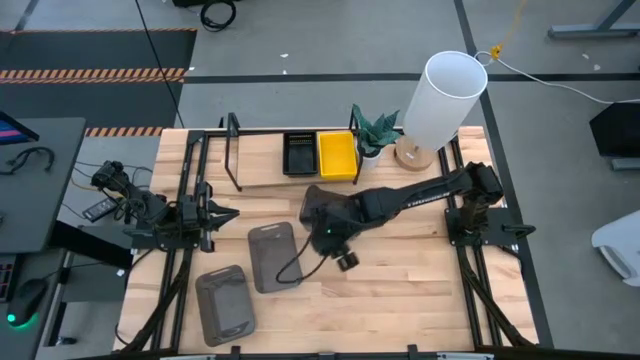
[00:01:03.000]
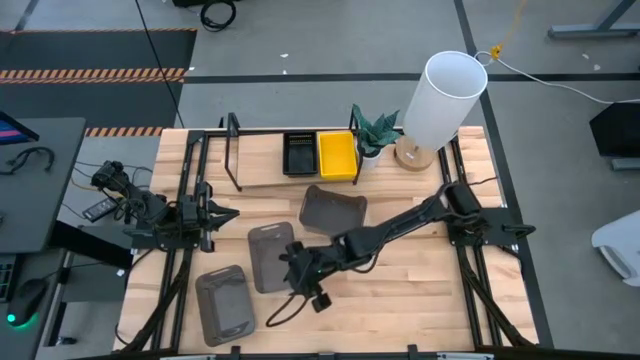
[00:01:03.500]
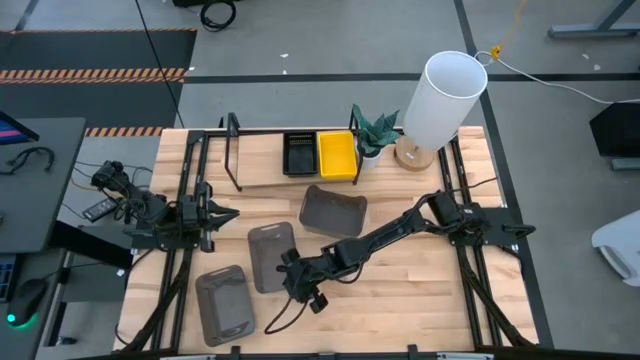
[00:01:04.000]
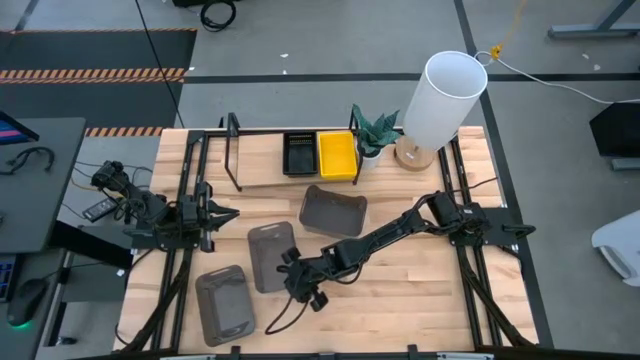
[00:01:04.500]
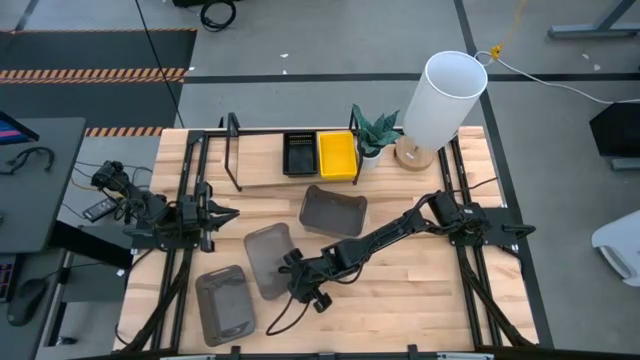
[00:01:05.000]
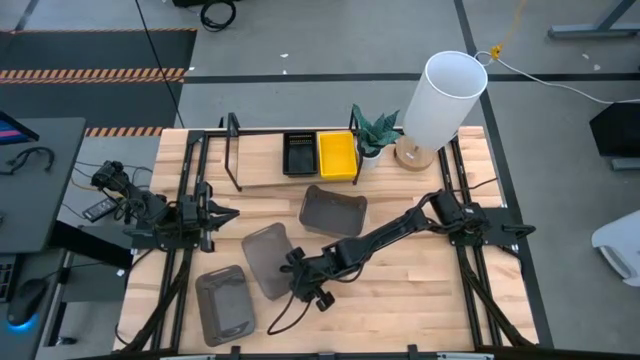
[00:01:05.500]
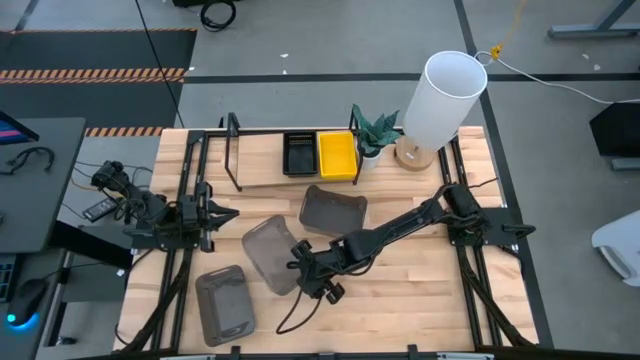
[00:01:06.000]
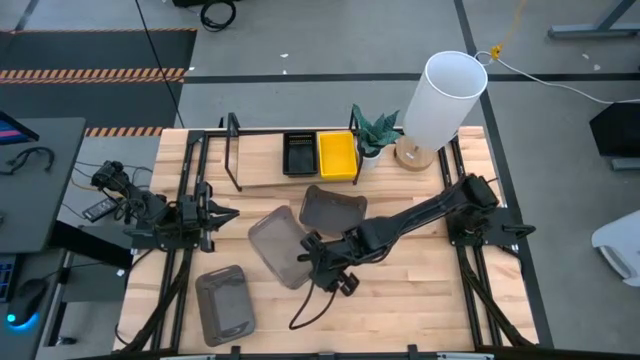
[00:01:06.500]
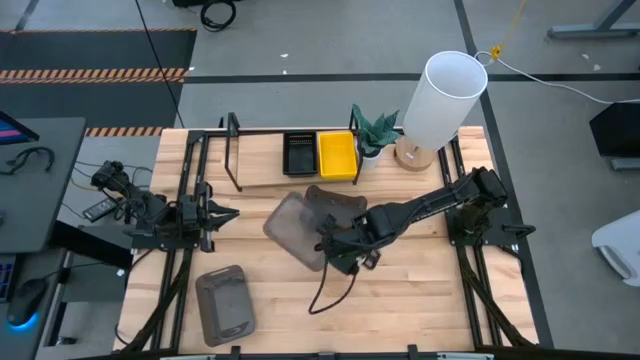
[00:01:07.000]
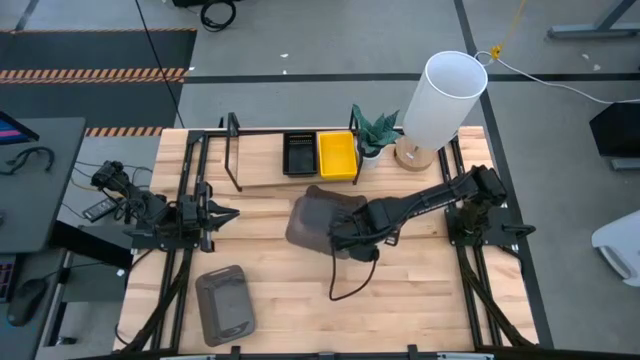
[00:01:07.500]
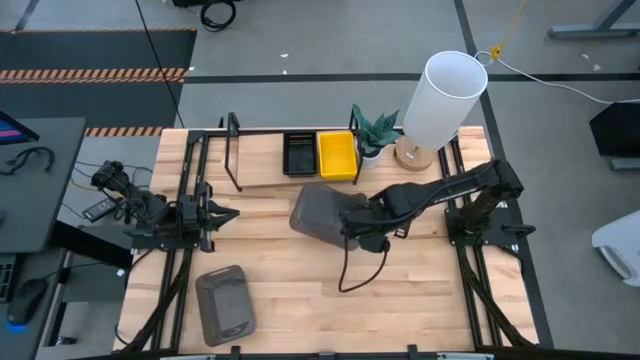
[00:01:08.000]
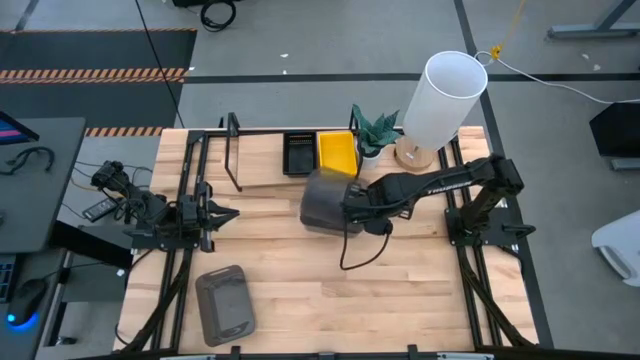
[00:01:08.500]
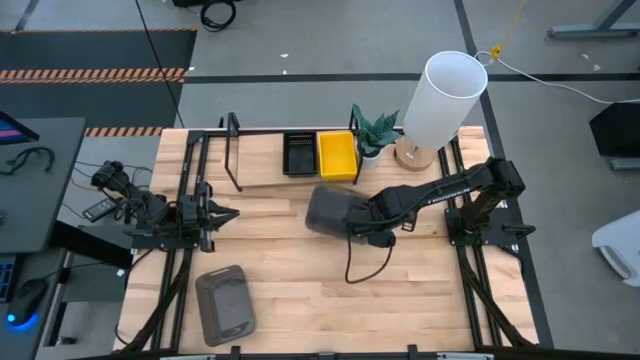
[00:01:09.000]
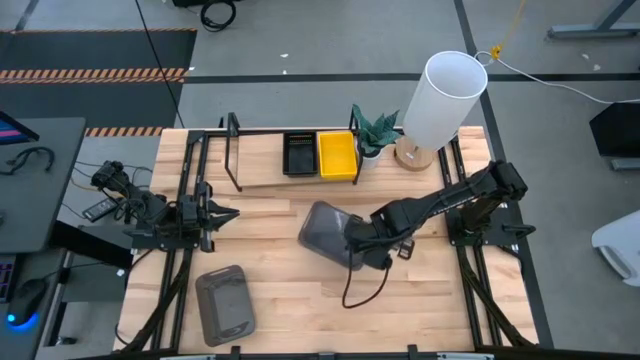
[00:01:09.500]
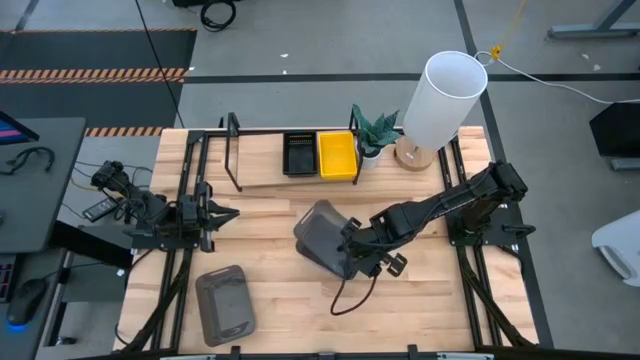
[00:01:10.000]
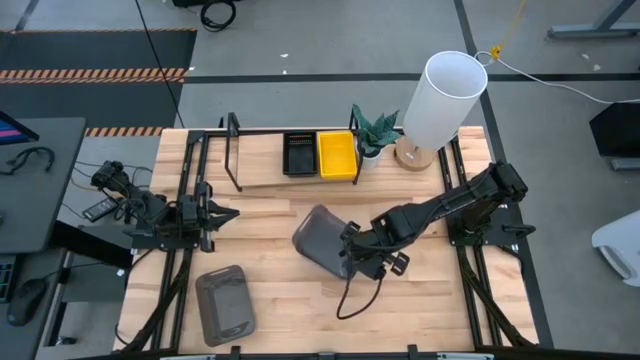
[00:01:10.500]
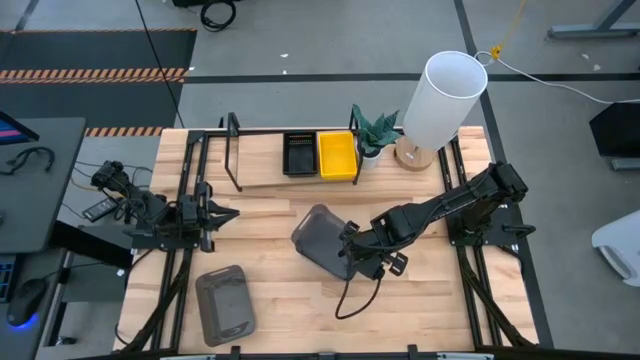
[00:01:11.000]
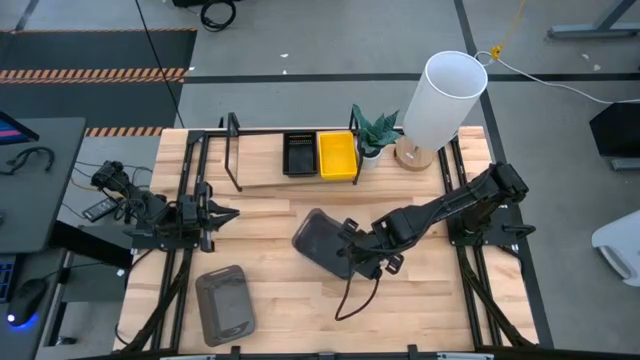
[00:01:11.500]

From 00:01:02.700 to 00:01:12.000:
Task: Stack baskets on shelf by color
Stack the middle black bin on top of the top black bin

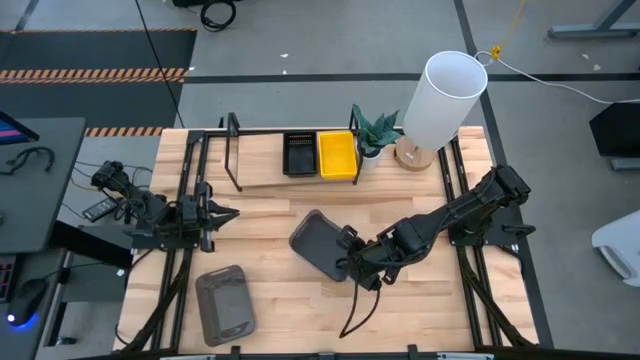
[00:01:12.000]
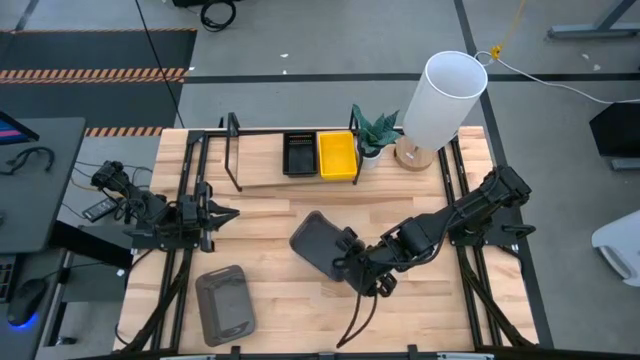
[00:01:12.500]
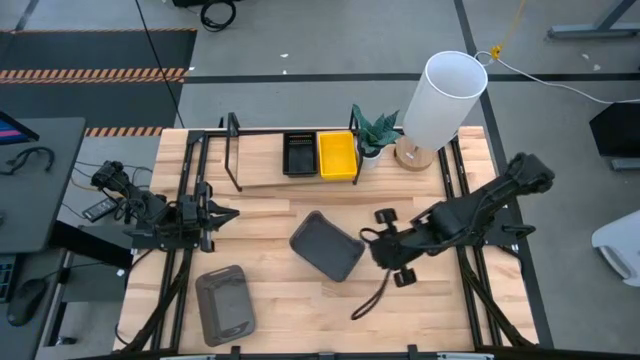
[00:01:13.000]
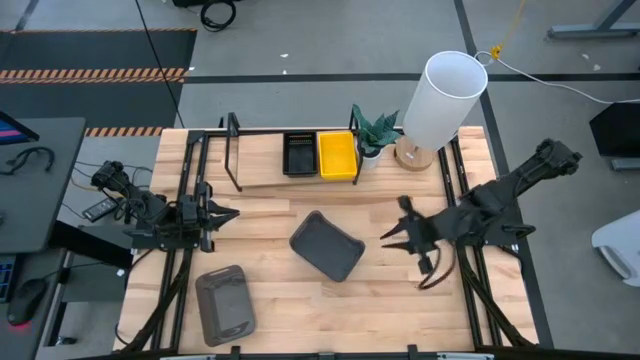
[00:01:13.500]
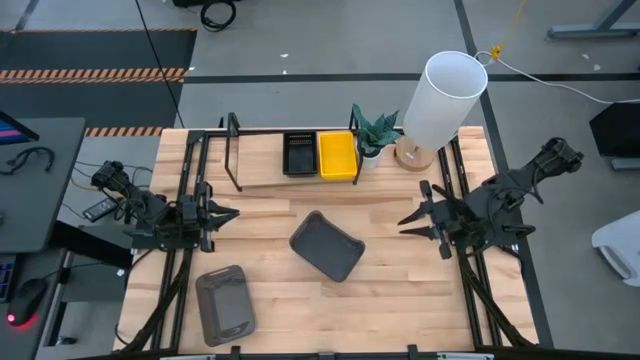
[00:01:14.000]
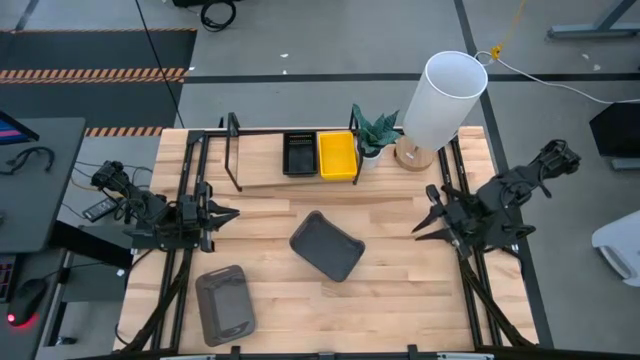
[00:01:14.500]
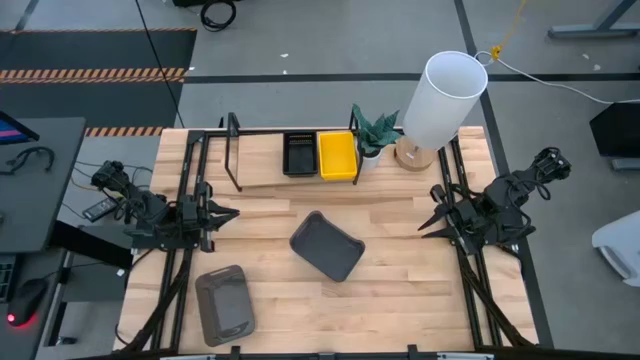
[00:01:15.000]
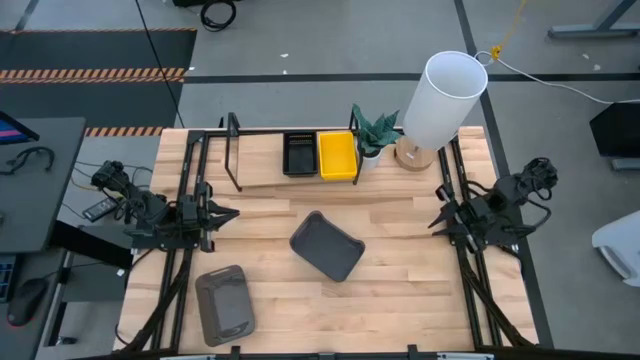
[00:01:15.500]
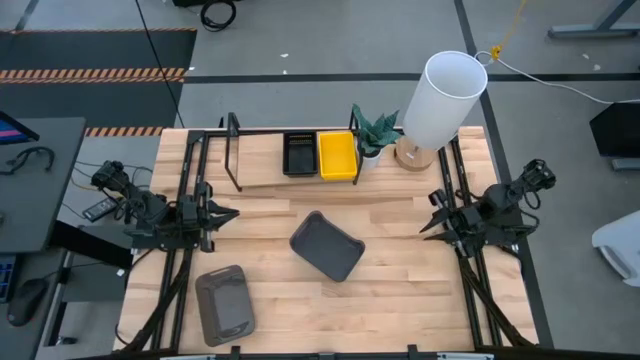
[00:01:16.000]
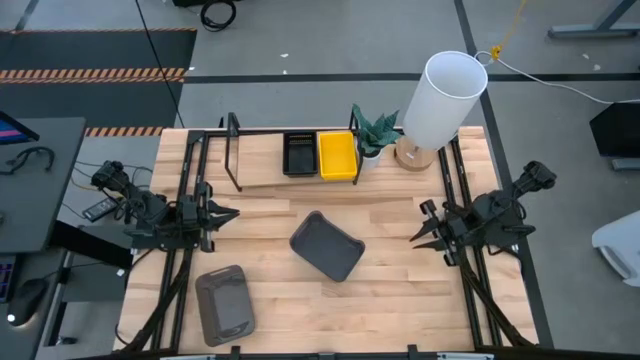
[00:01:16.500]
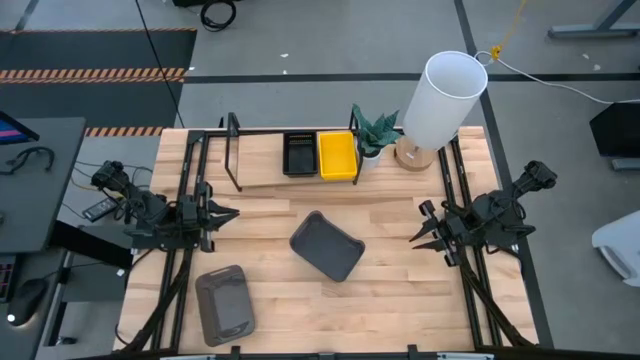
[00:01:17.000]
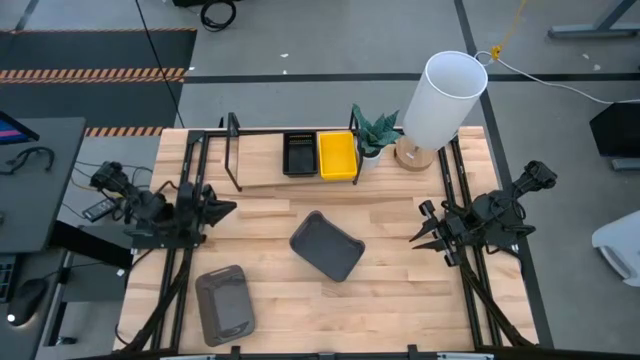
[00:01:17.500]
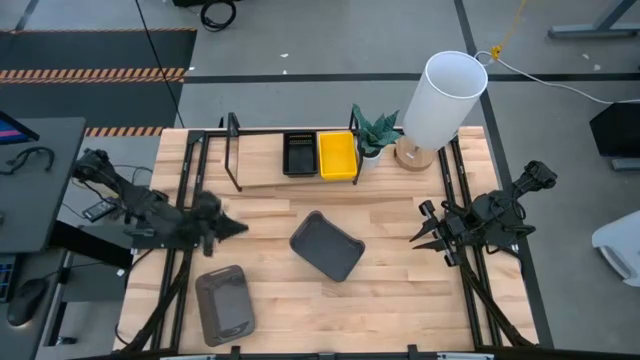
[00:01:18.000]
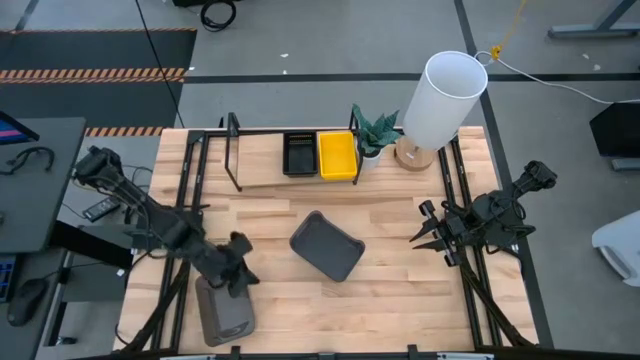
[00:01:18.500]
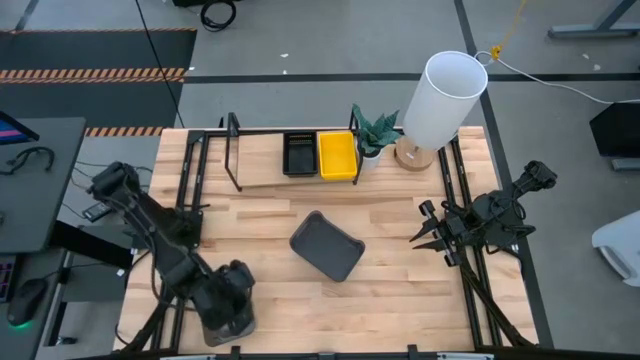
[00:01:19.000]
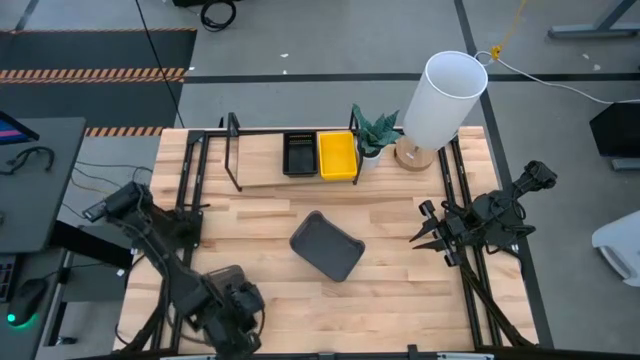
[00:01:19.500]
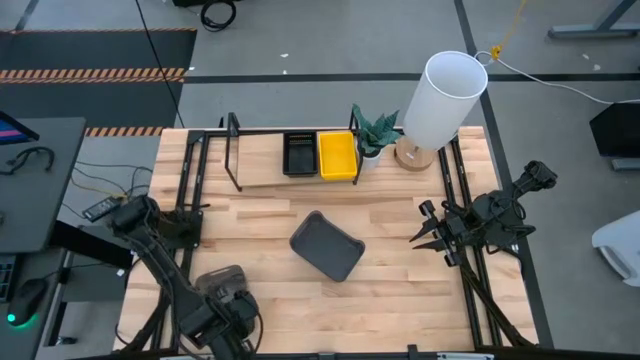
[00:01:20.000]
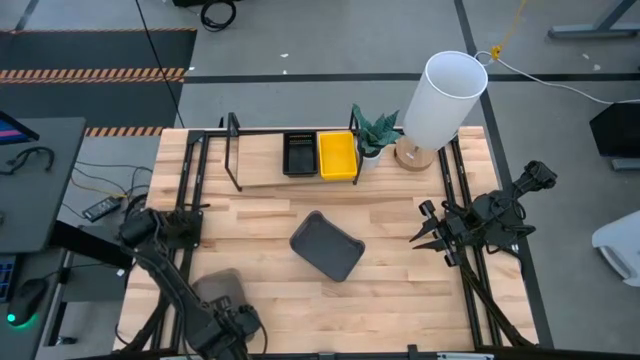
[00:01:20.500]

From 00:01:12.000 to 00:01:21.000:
Stack the bottom black bin on top of the top black bin

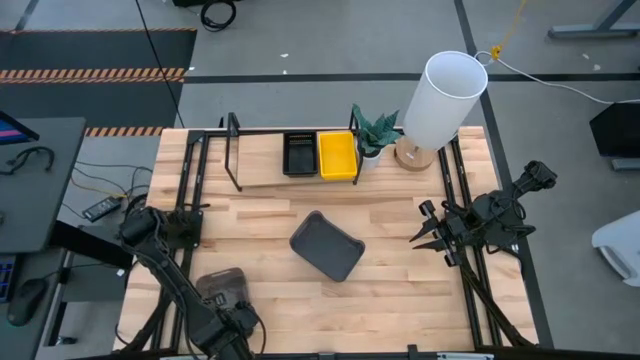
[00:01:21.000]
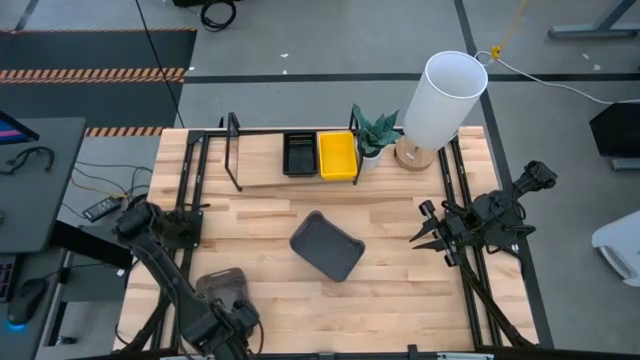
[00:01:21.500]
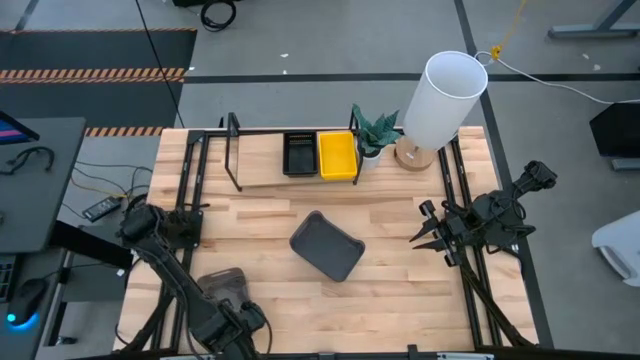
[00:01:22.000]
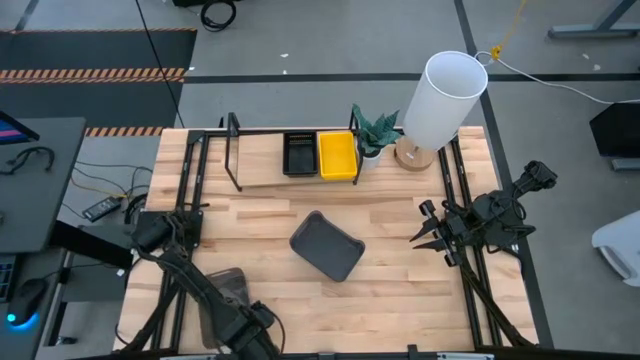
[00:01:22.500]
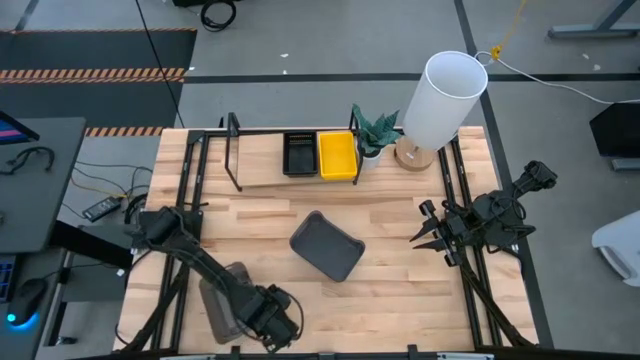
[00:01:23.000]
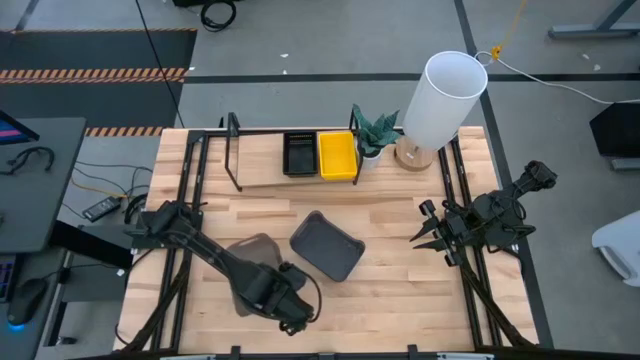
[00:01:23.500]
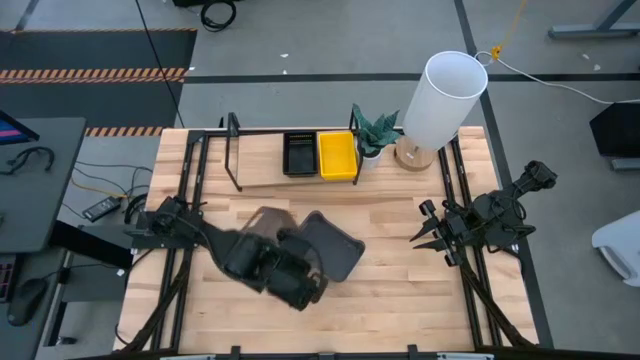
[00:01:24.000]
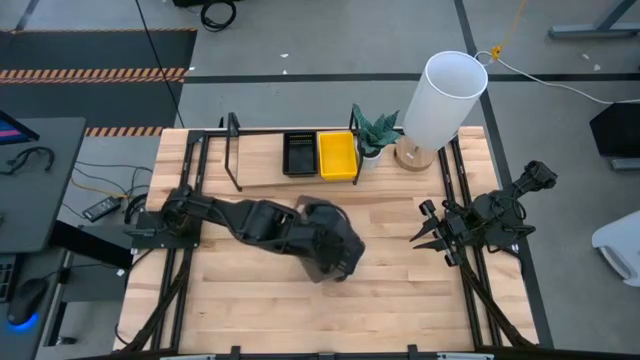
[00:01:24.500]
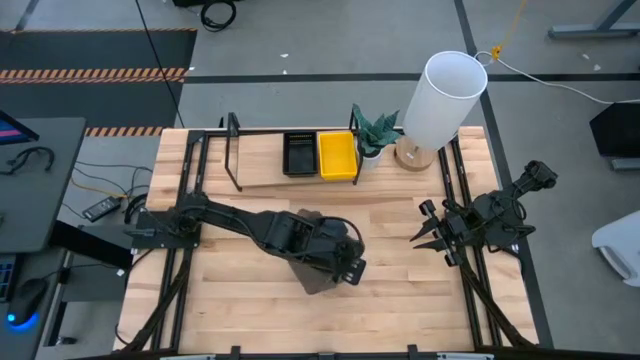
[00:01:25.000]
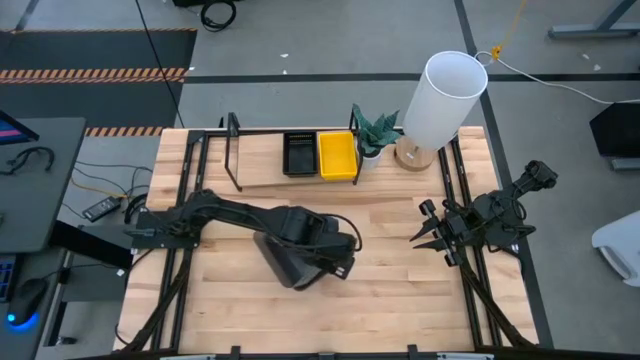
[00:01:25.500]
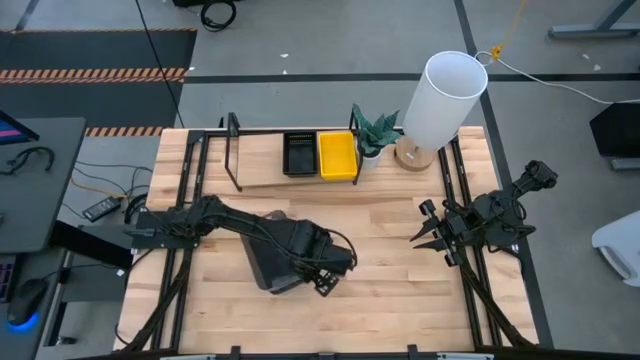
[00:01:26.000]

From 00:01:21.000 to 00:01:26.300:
Stack the bottom black bin on top of the top black bin
